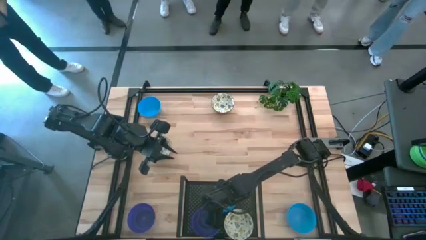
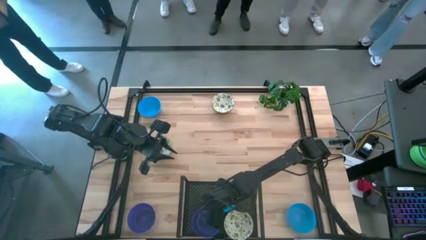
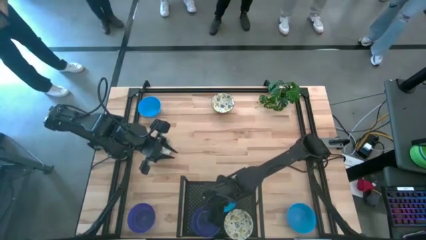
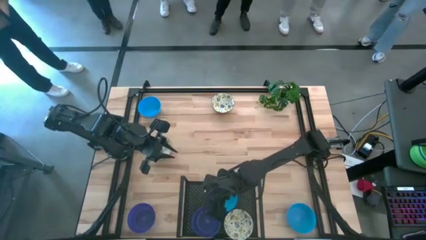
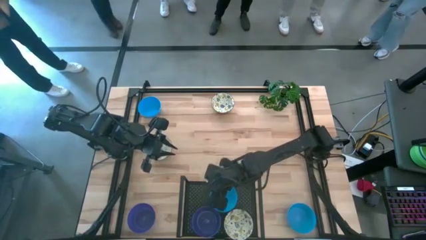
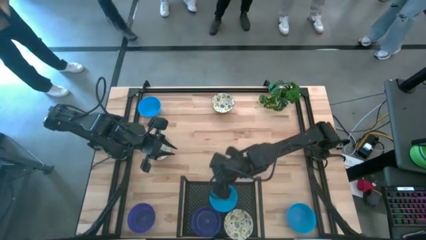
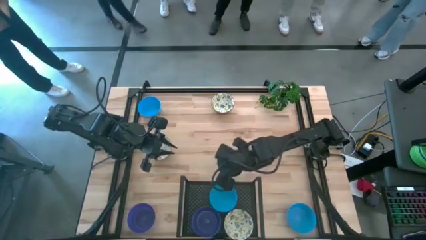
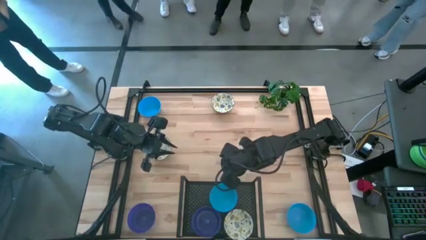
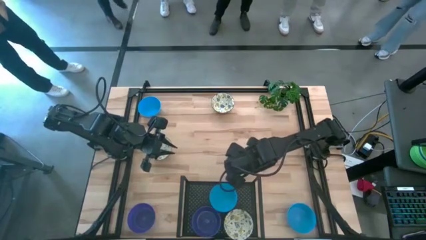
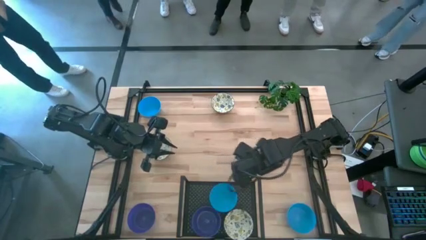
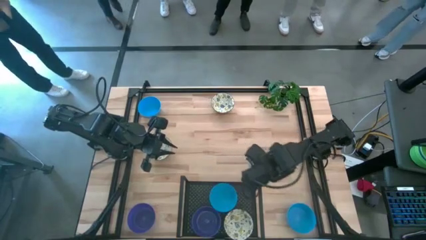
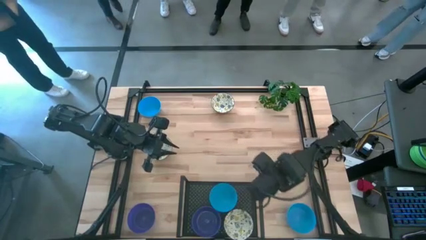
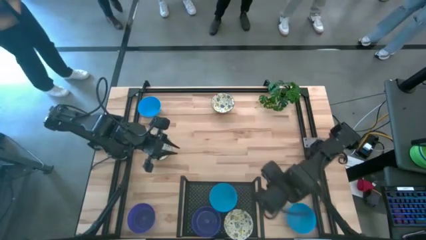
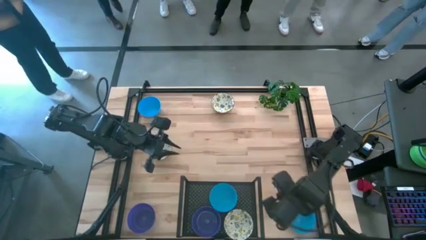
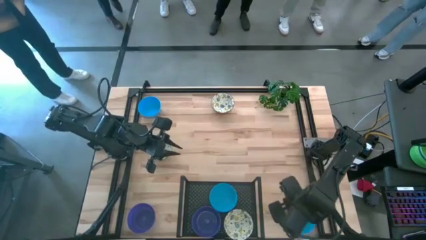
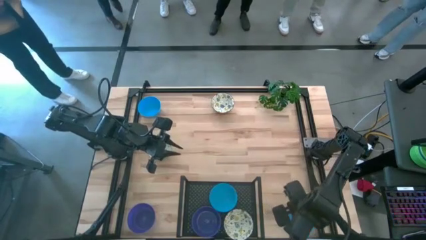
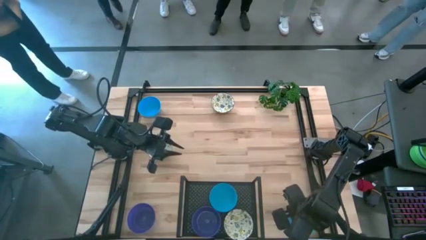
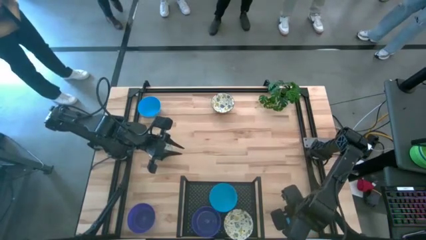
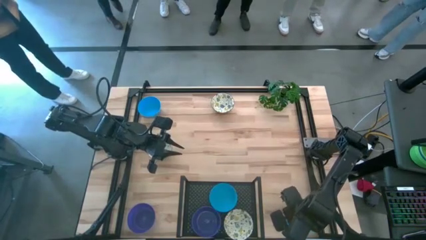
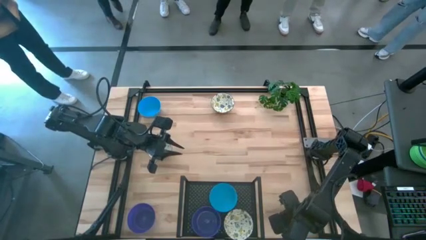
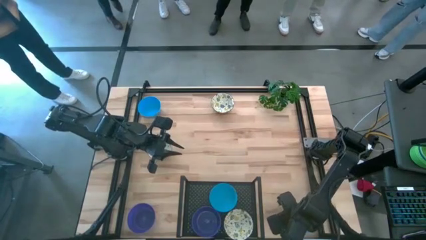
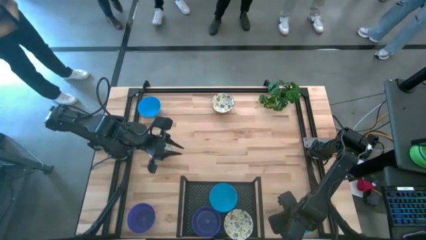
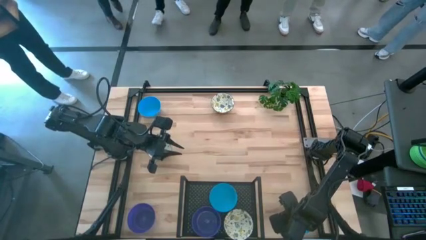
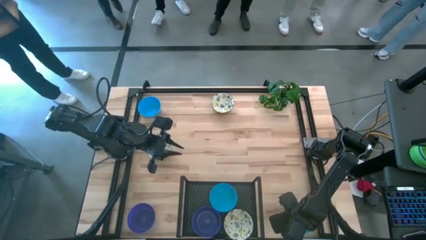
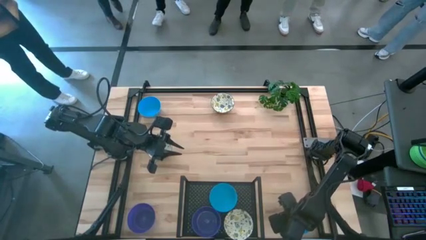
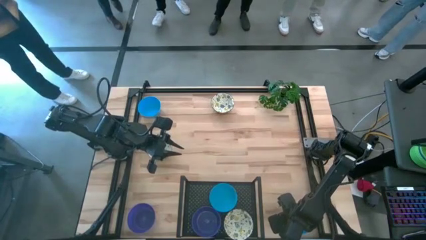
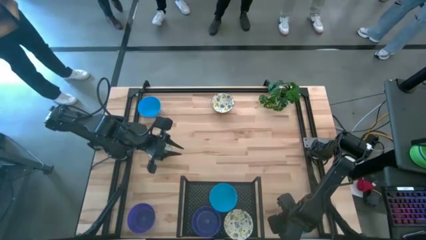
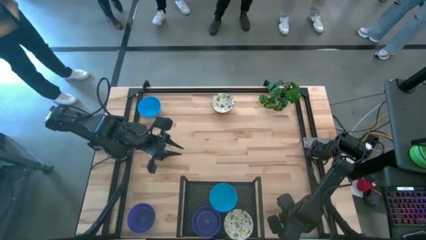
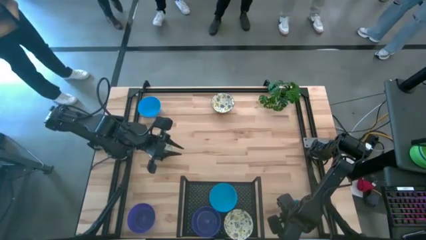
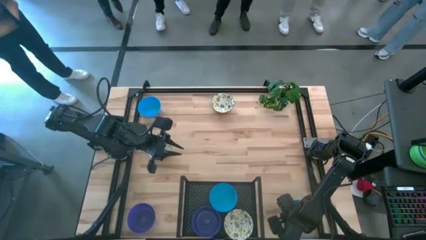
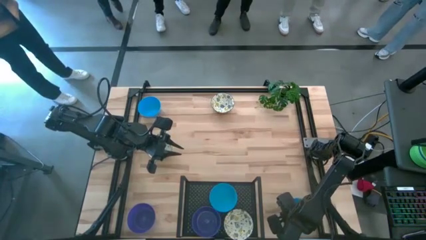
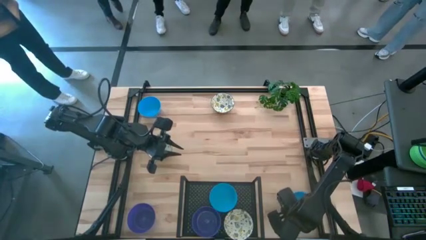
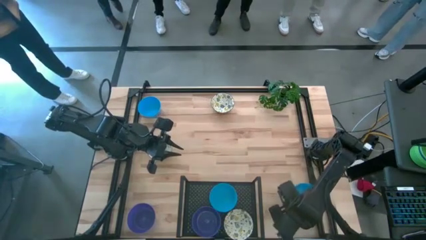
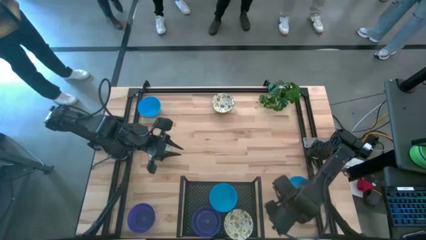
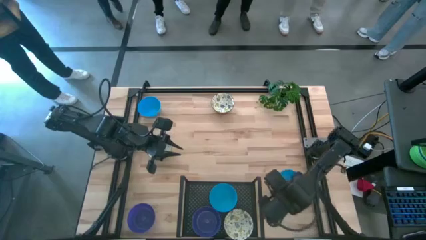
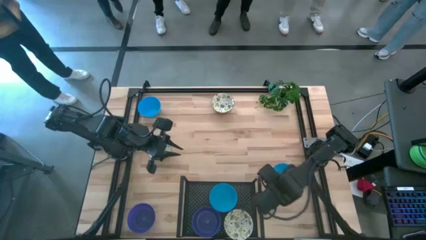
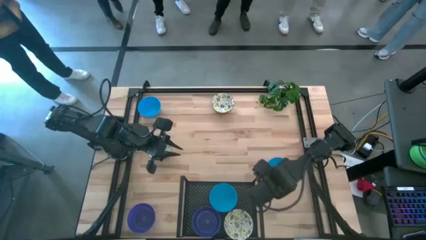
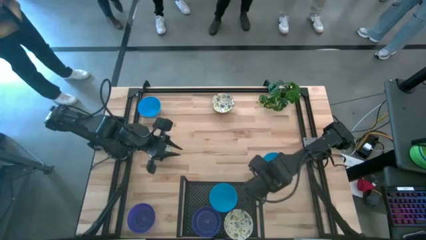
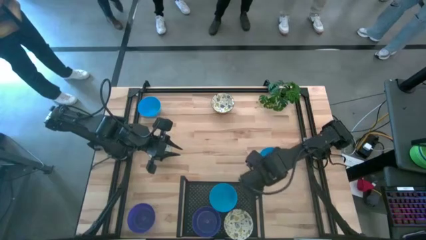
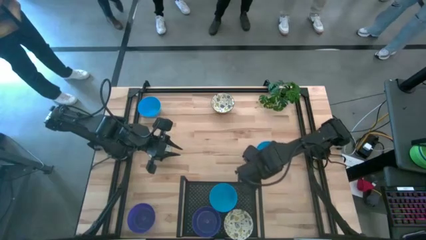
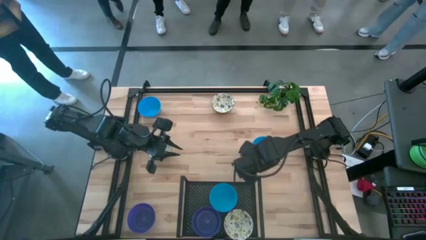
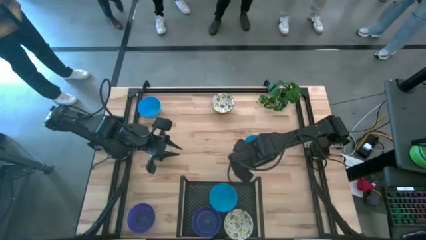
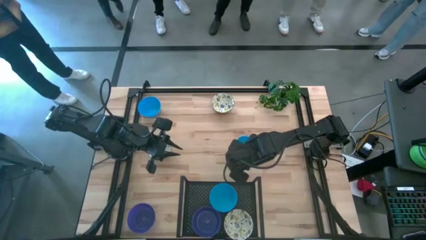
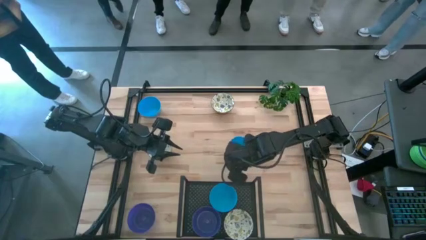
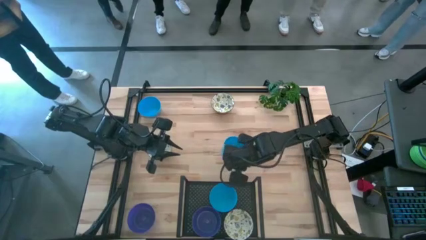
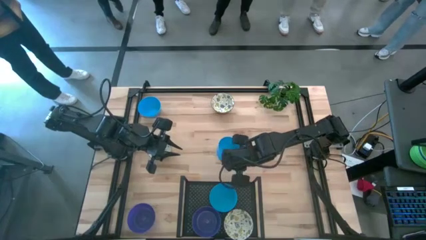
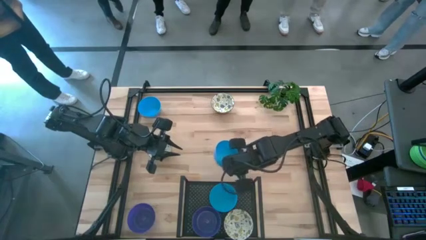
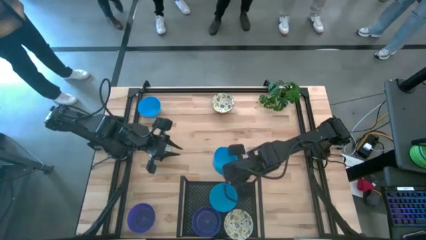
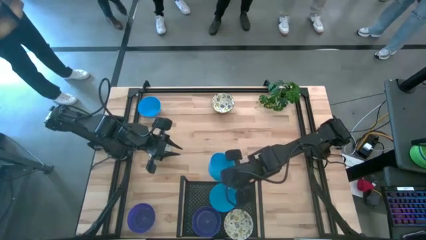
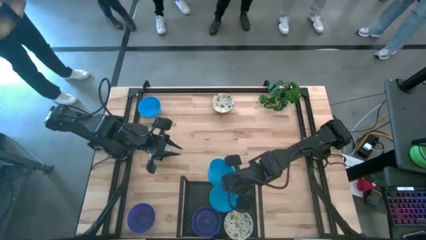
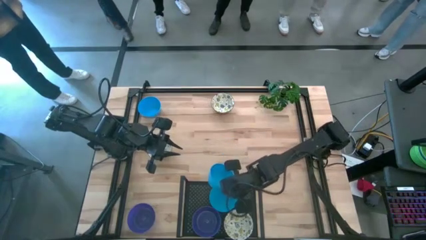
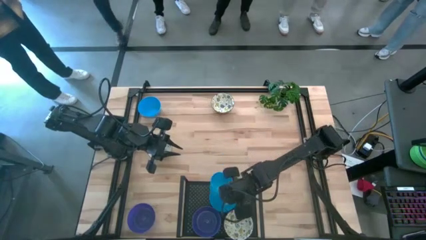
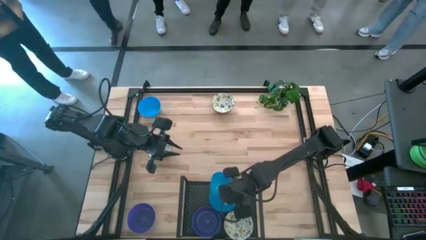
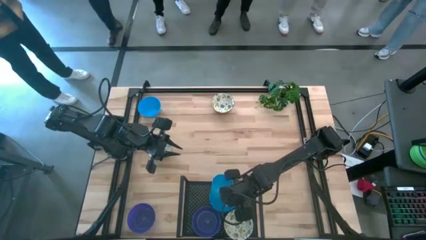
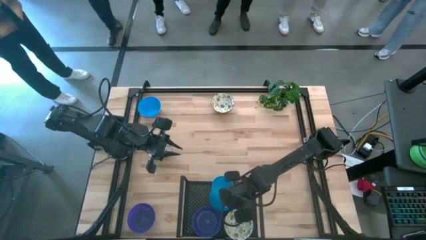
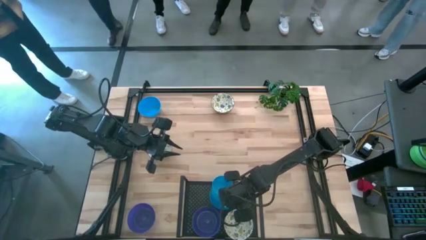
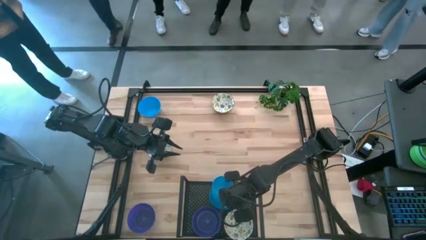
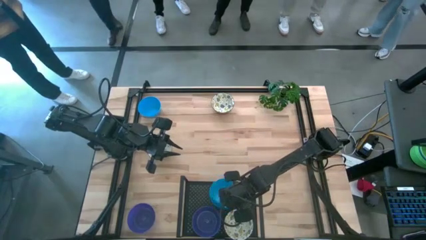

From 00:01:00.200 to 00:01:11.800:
Task: Pick & Place Mini bowls
Stack the bottom blue bowl on top of the blue bowl on the shelf
